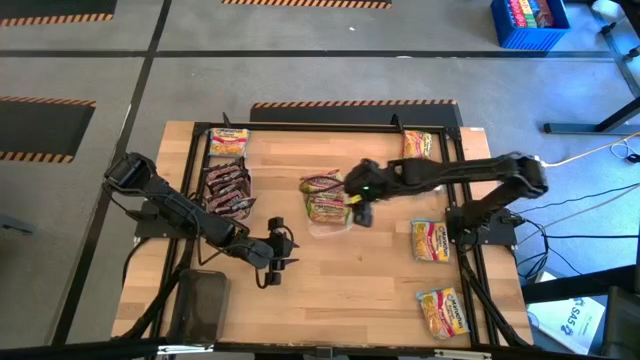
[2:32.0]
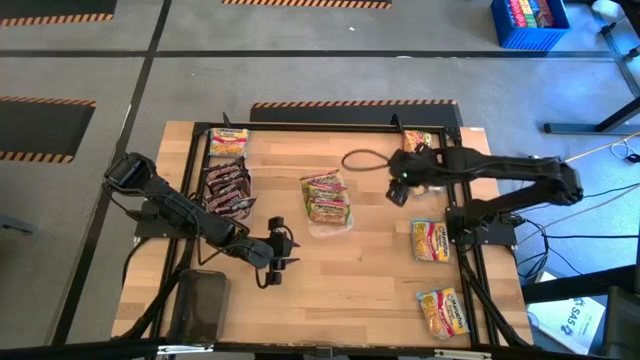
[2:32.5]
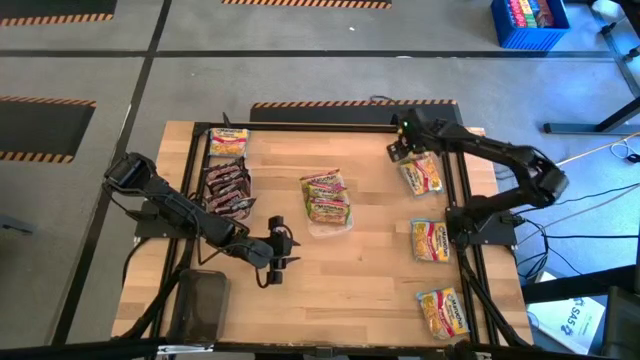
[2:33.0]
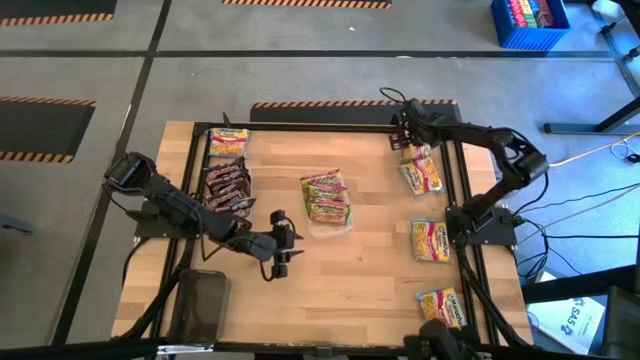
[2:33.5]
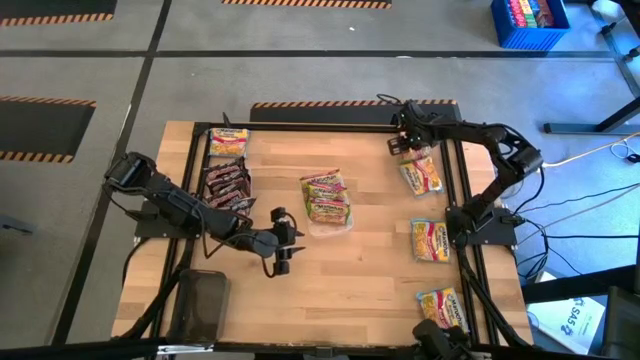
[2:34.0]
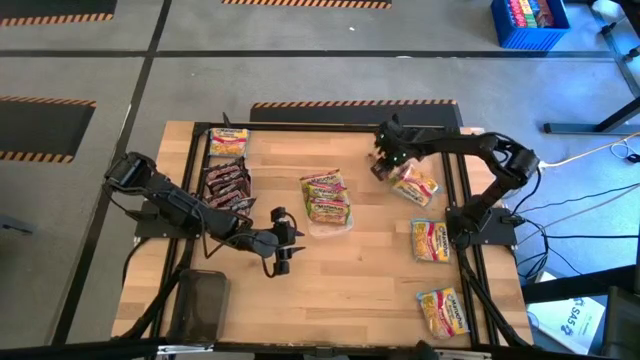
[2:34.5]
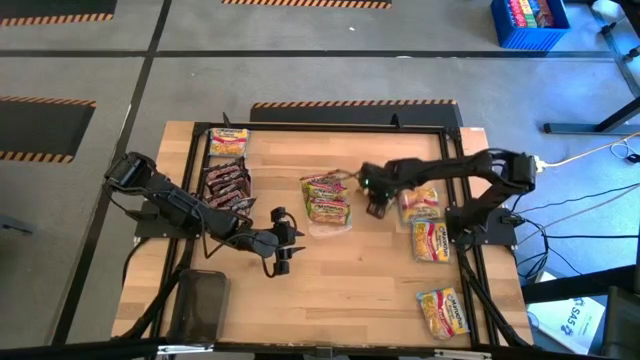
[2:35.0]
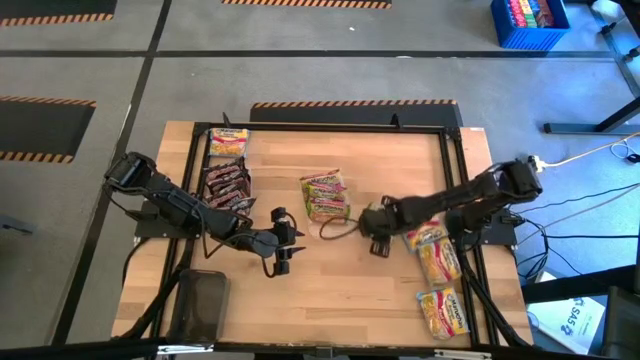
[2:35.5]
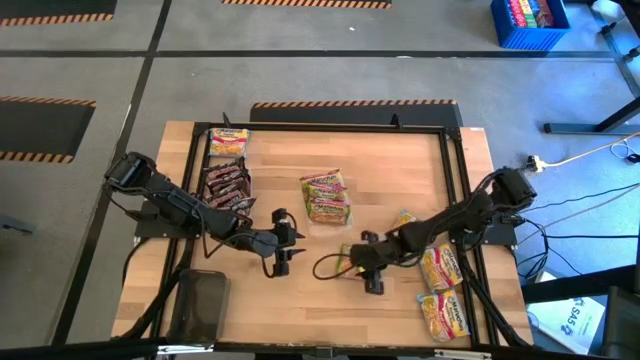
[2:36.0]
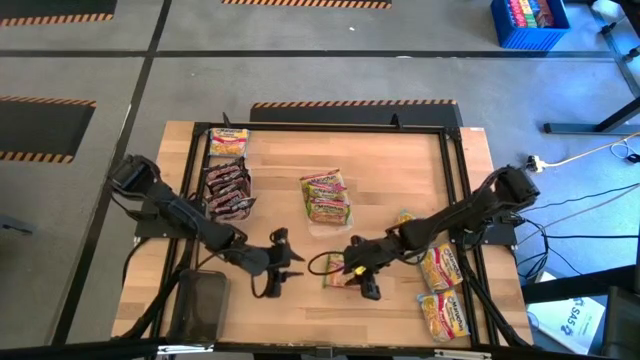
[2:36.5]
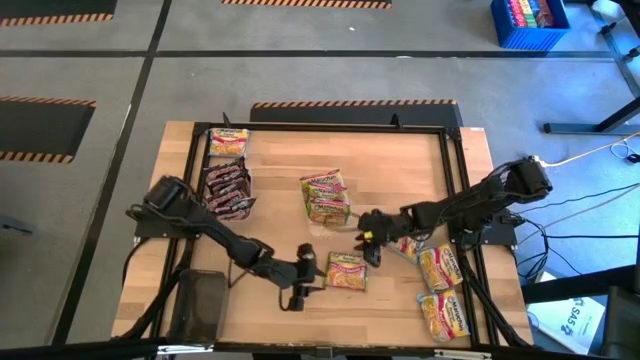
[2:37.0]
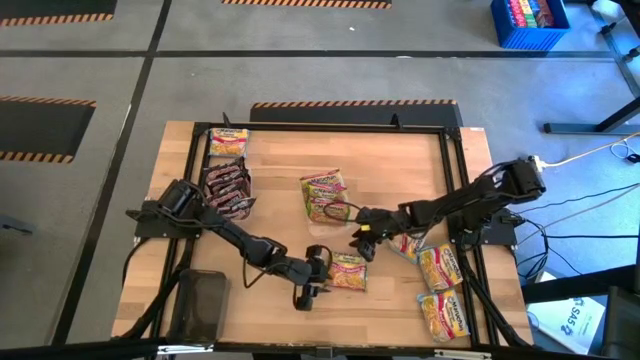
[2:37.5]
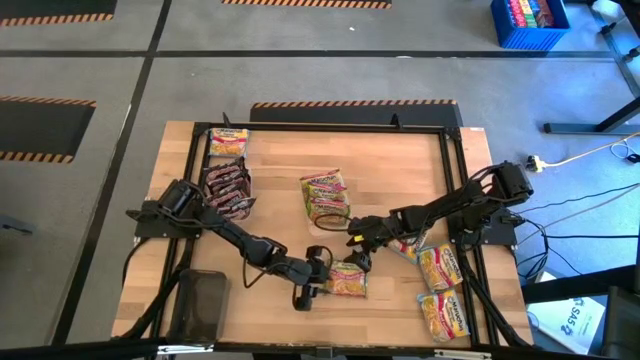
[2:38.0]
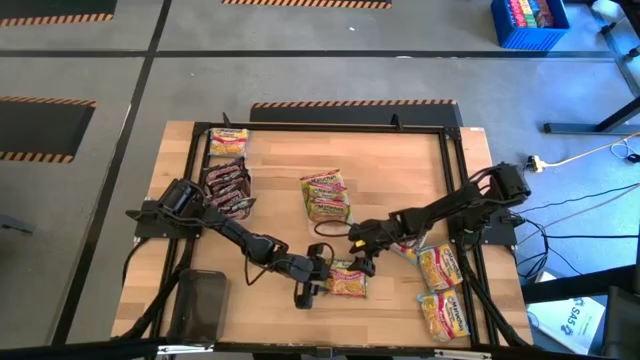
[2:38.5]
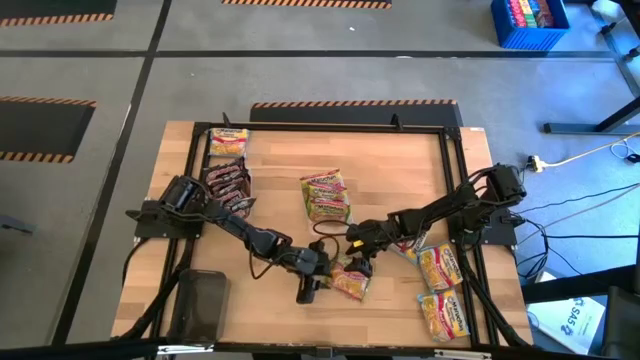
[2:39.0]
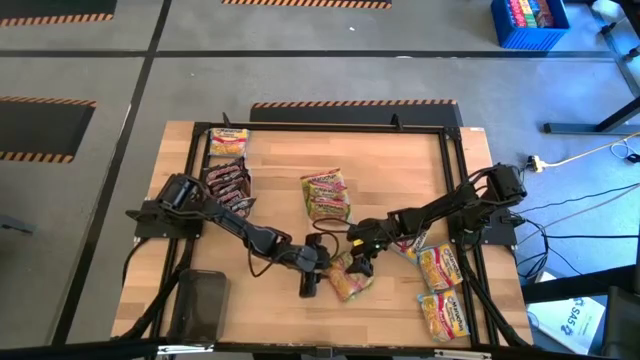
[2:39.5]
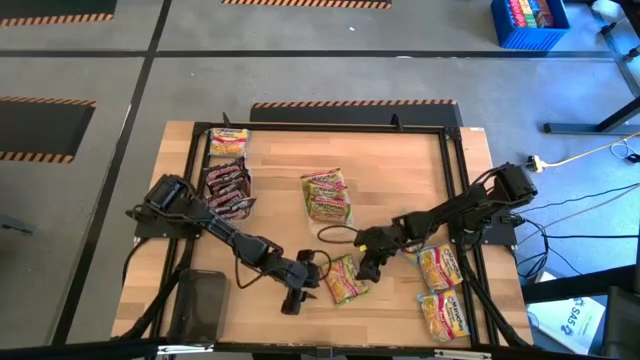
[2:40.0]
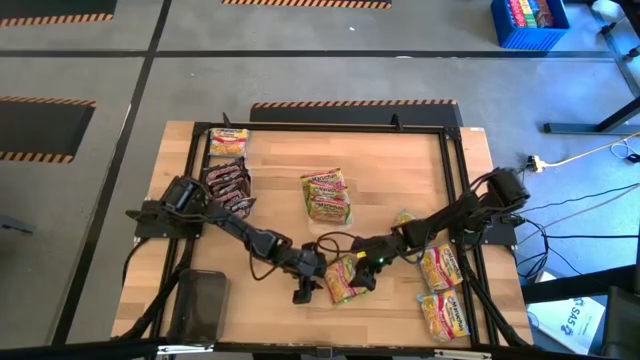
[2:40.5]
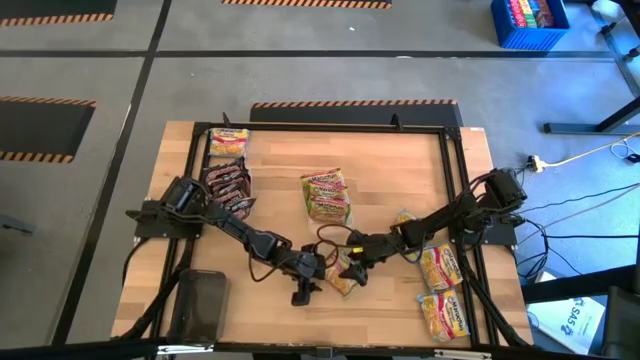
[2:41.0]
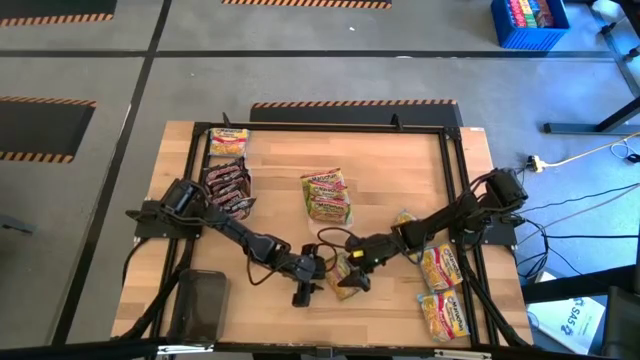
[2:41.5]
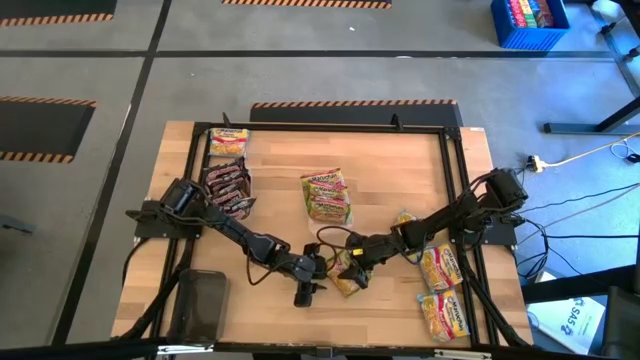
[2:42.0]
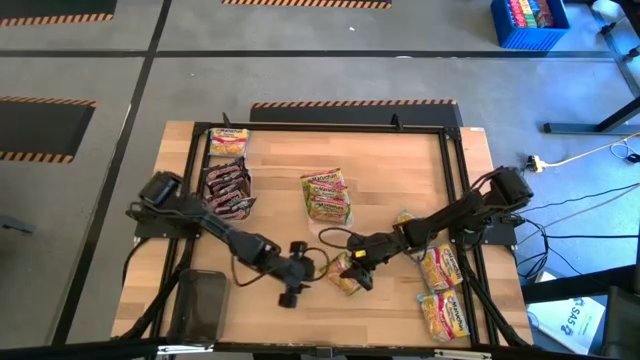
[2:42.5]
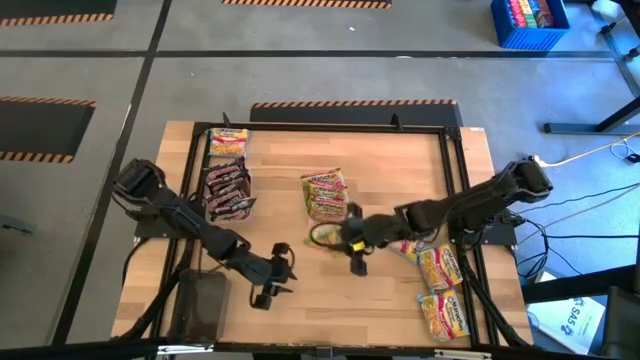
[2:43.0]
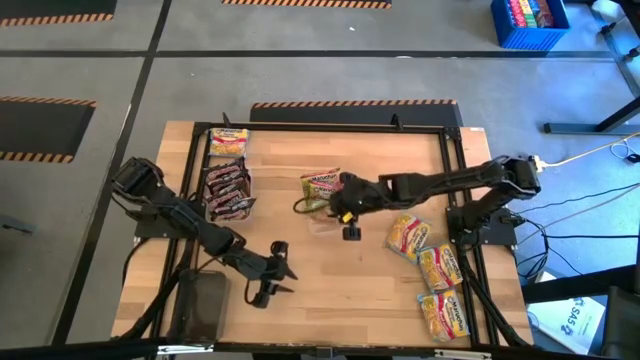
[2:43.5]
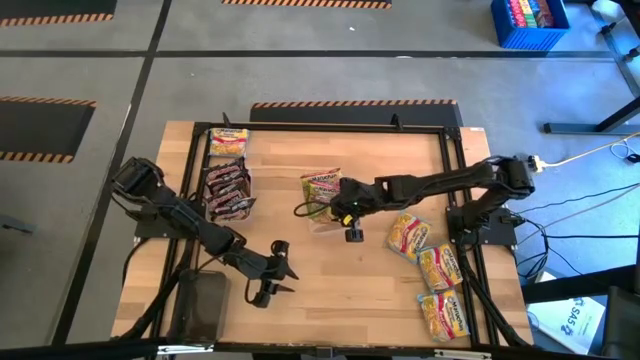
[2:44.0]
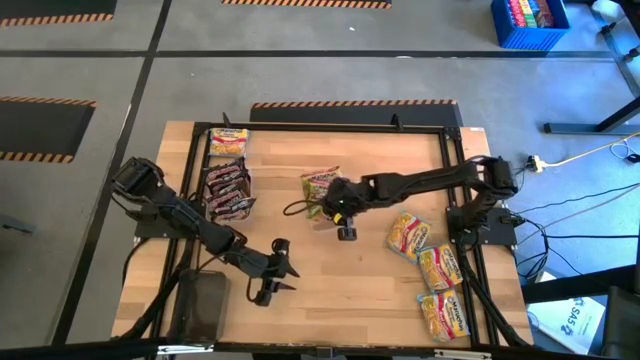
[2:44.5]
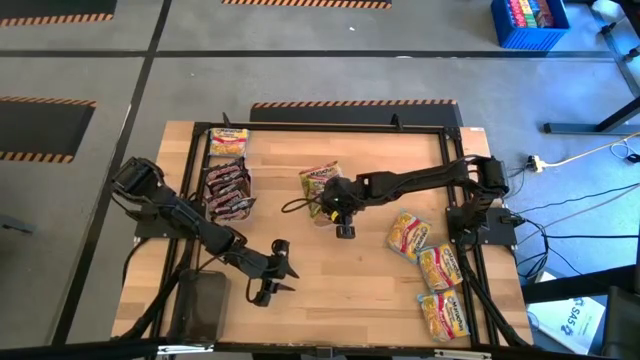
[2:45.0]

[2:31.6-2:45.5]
Task: Sort Maruchan noodles
Put the green noodle pack into the right transparent bin

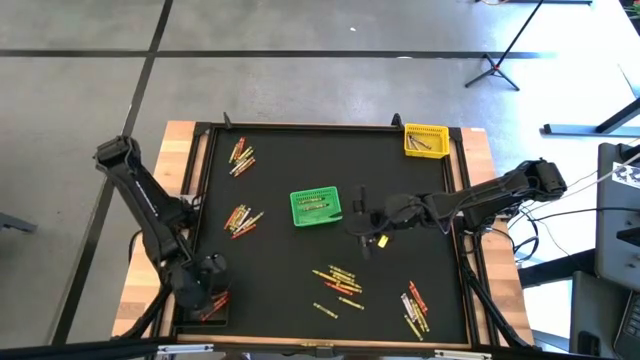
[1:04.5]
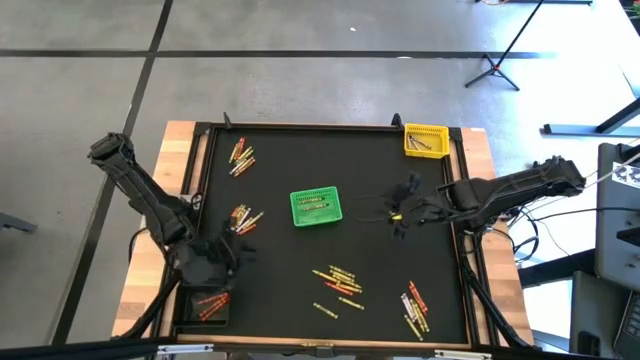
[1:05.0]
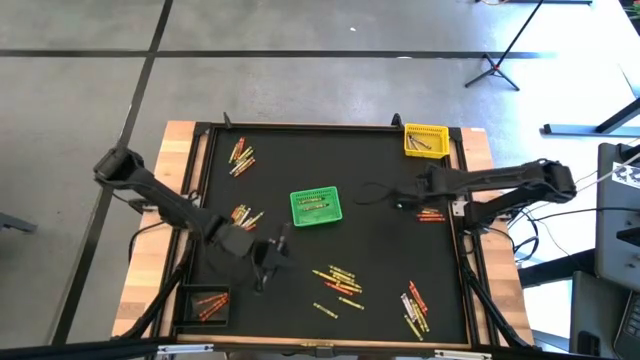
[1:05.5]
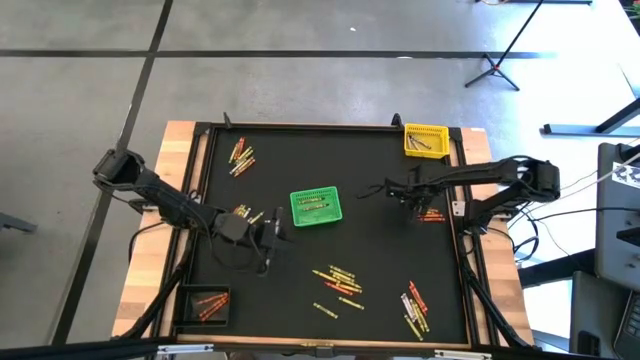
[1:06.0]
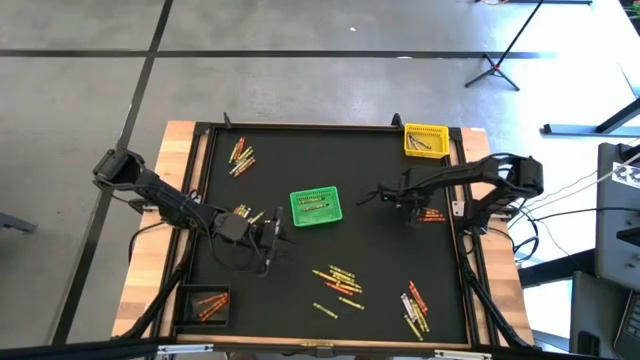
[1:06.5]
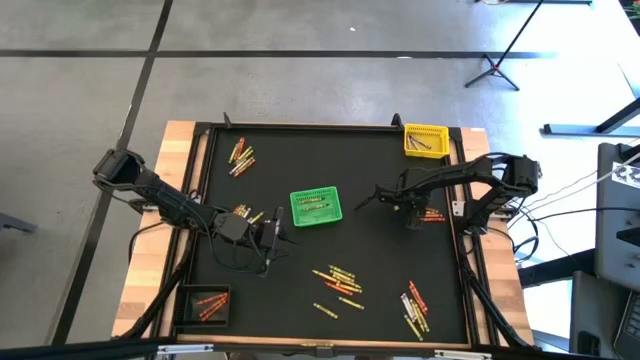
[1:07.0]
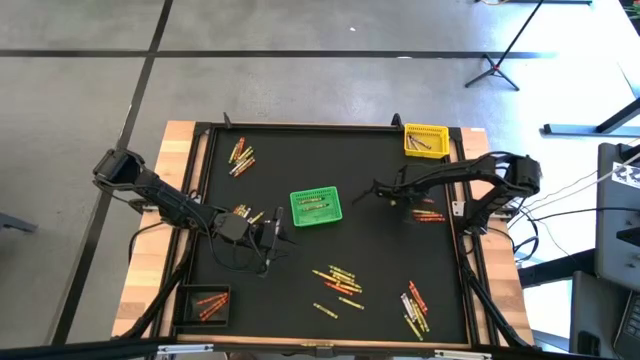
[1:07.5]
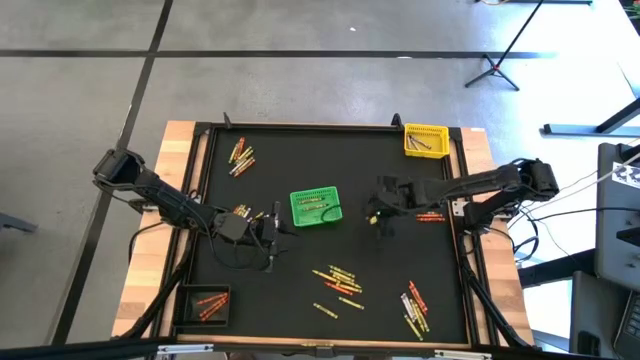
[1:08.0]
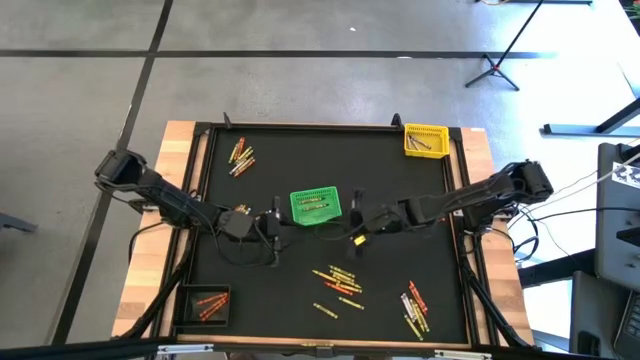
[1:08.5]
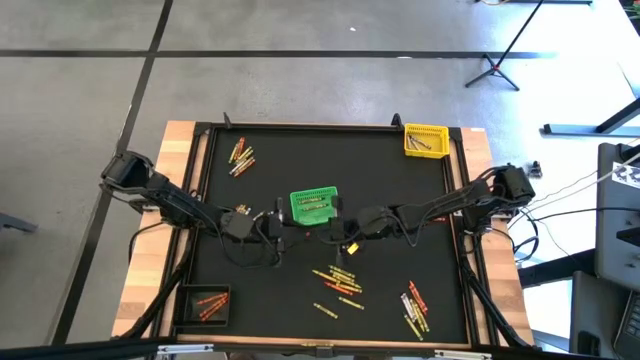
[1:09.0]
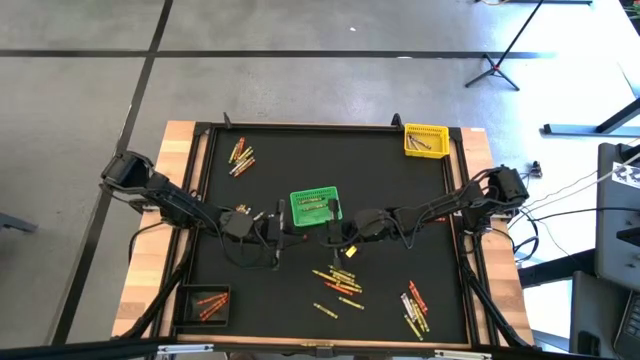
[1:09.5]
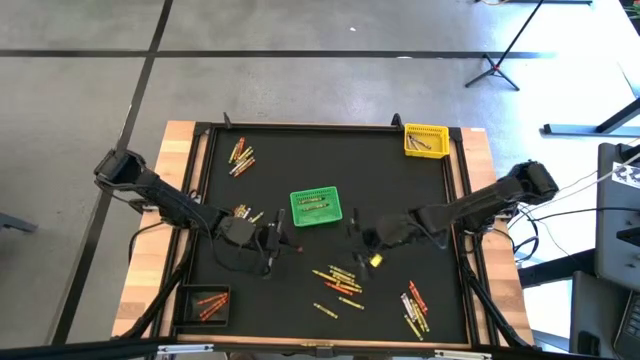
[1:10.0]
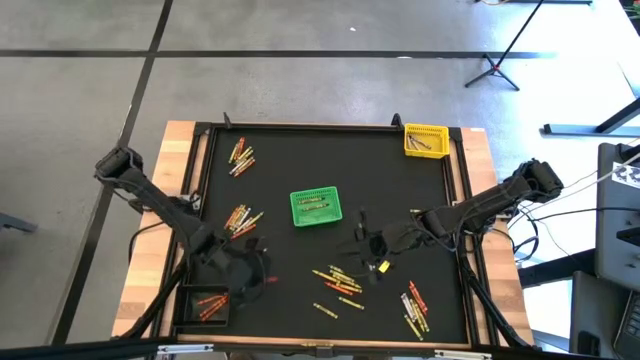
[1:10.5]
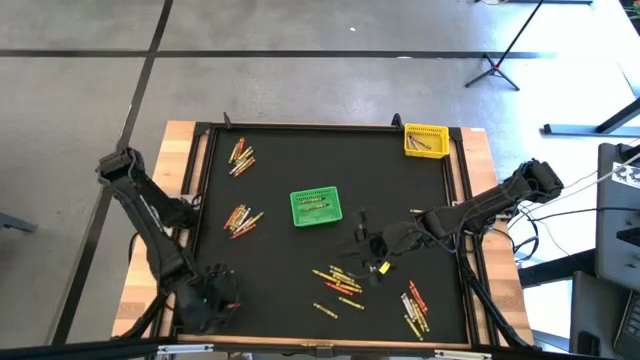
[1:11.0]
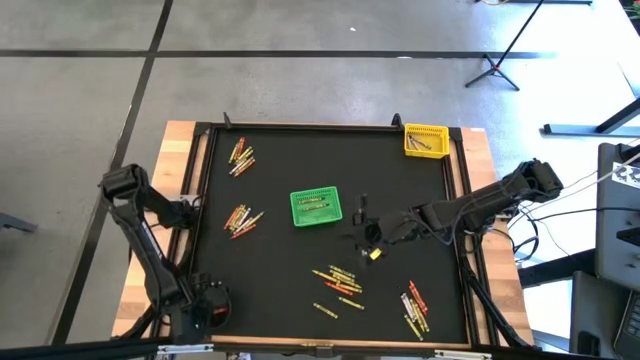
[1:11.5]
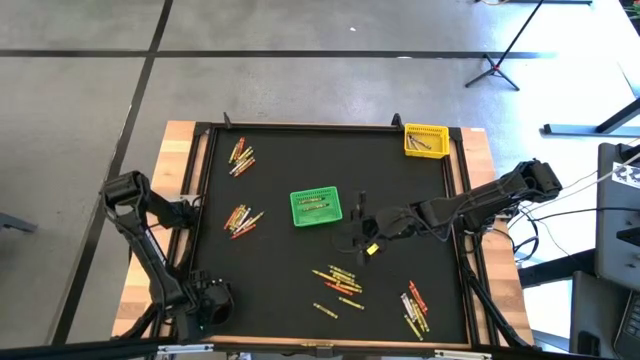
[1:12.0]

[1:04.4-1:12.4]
Task: Sort crayons
Put the orange crayon into the black bin
